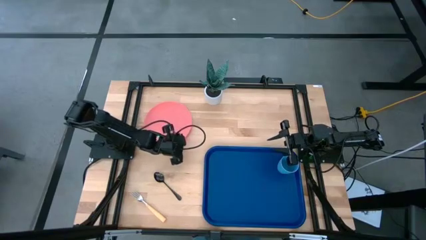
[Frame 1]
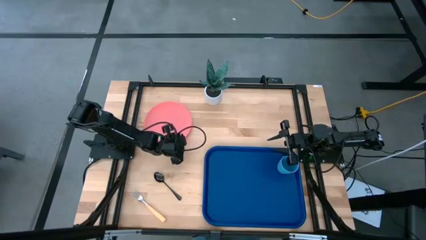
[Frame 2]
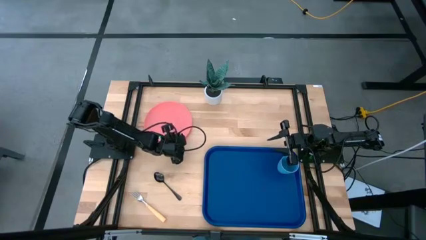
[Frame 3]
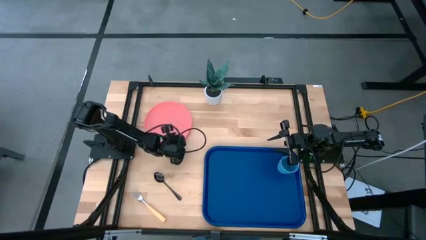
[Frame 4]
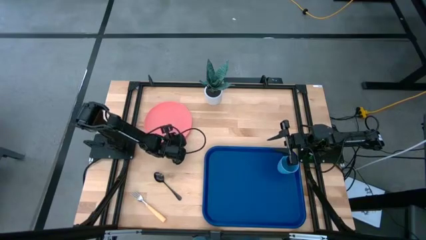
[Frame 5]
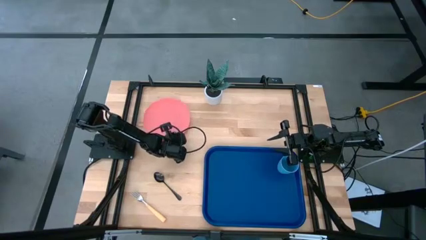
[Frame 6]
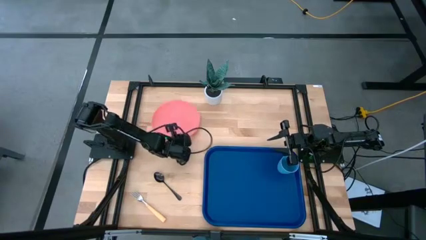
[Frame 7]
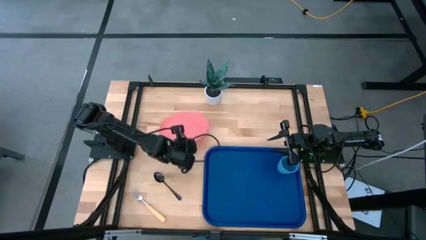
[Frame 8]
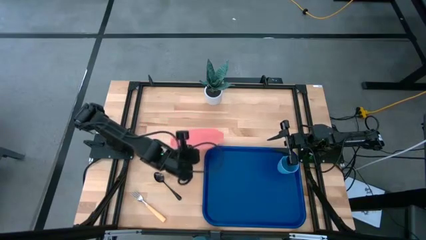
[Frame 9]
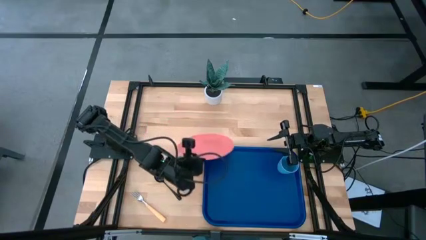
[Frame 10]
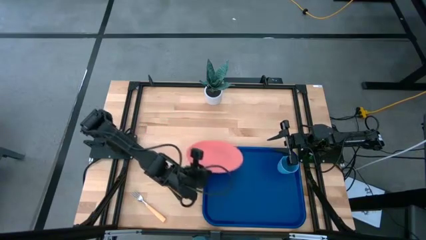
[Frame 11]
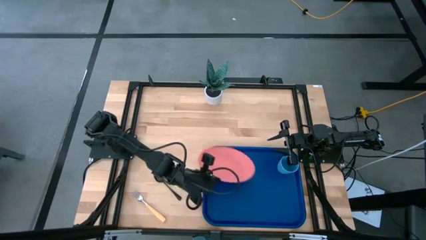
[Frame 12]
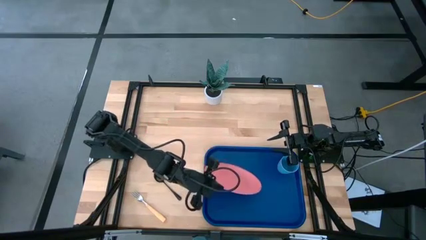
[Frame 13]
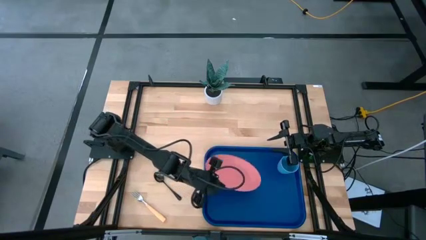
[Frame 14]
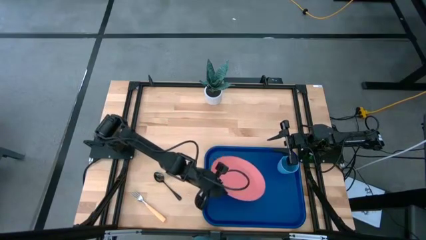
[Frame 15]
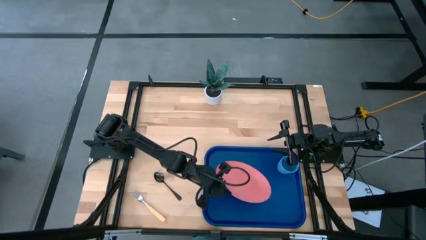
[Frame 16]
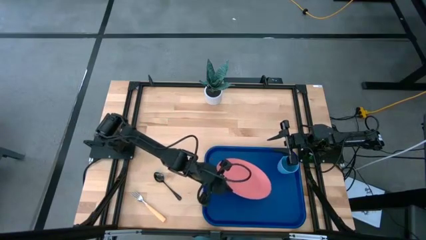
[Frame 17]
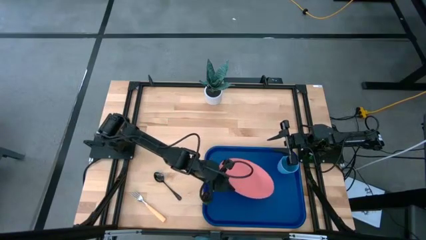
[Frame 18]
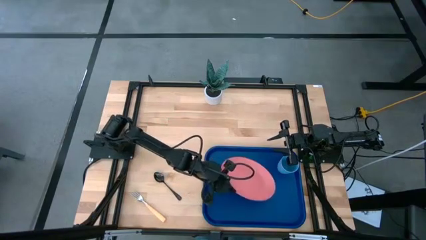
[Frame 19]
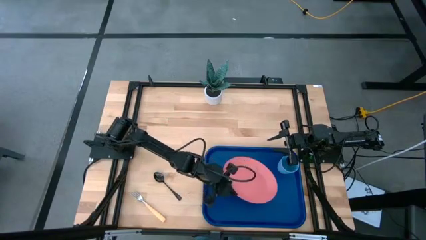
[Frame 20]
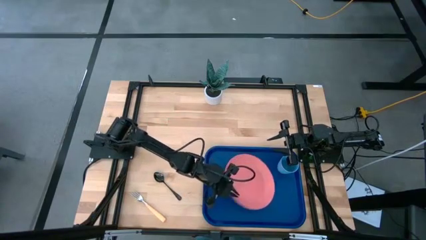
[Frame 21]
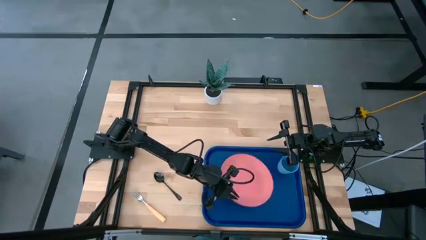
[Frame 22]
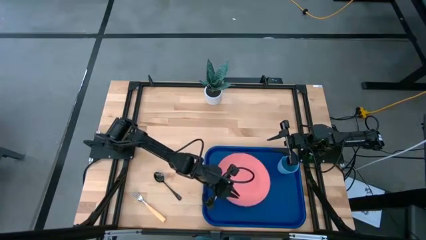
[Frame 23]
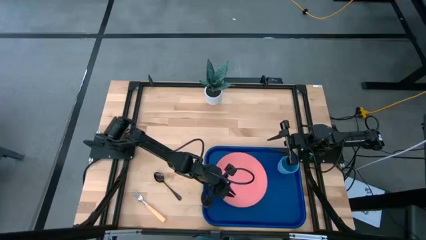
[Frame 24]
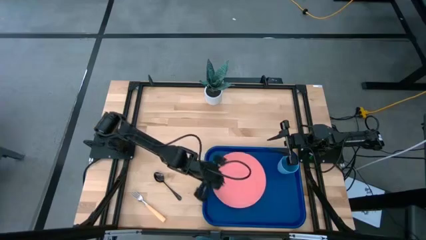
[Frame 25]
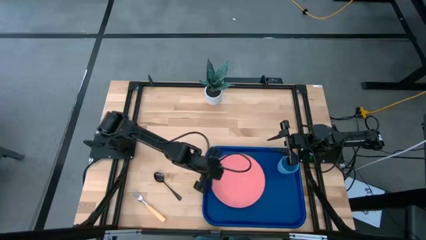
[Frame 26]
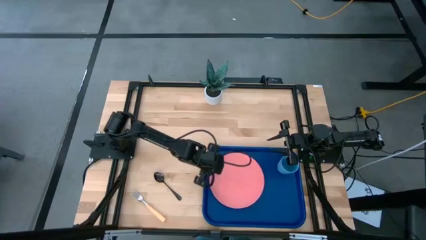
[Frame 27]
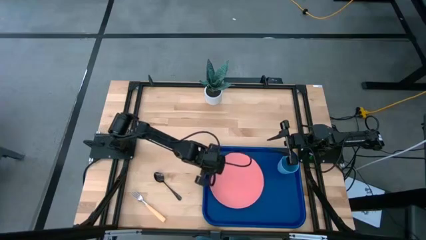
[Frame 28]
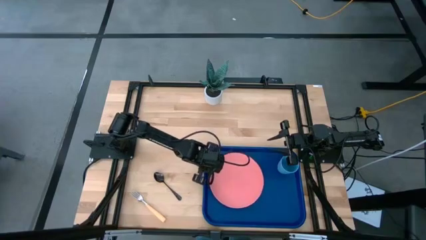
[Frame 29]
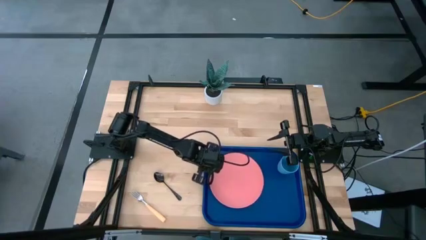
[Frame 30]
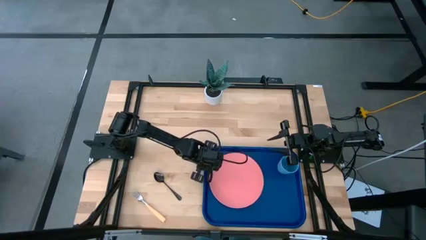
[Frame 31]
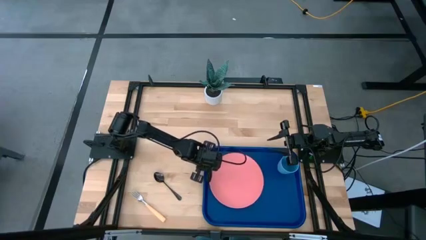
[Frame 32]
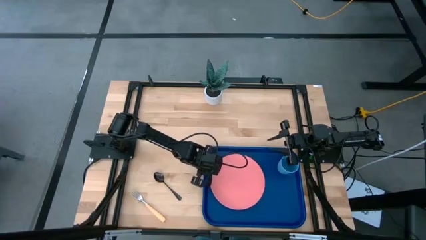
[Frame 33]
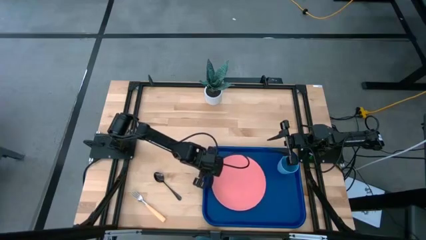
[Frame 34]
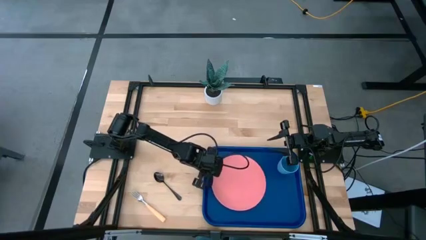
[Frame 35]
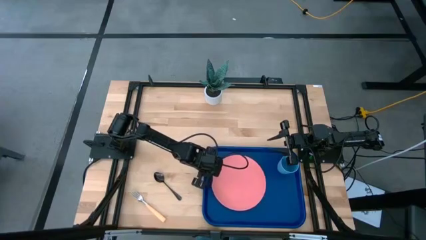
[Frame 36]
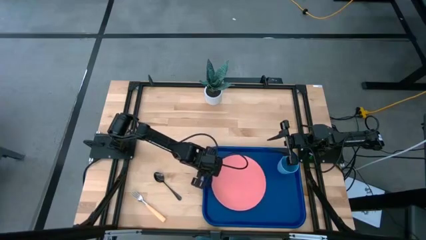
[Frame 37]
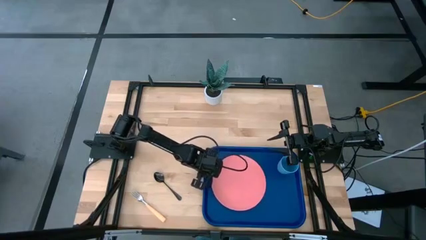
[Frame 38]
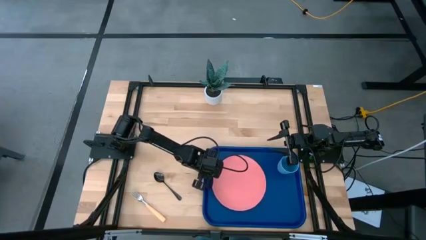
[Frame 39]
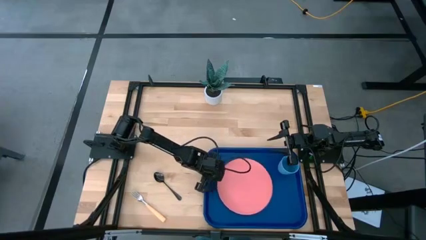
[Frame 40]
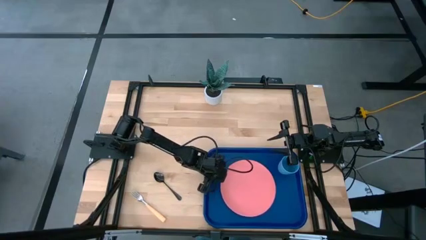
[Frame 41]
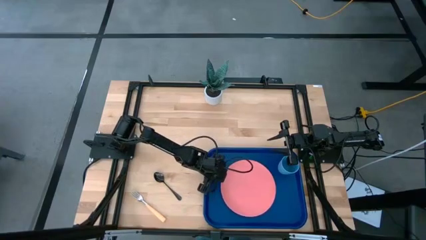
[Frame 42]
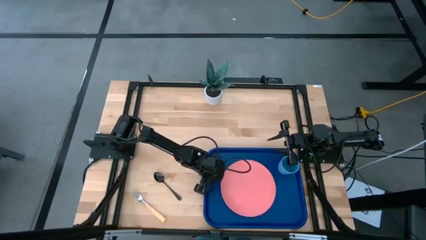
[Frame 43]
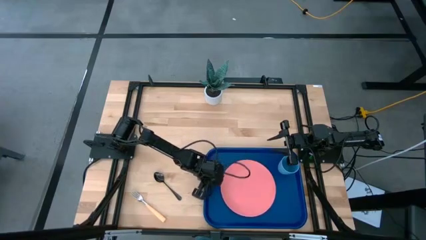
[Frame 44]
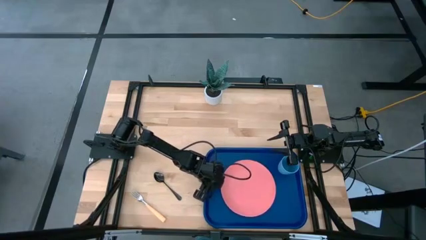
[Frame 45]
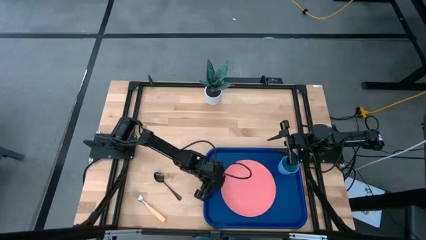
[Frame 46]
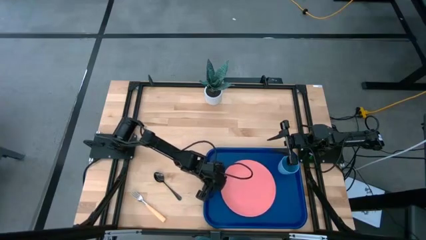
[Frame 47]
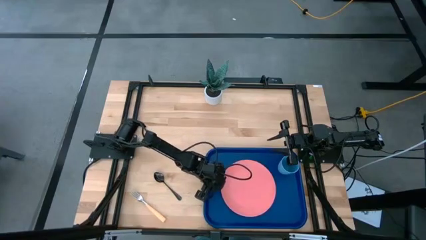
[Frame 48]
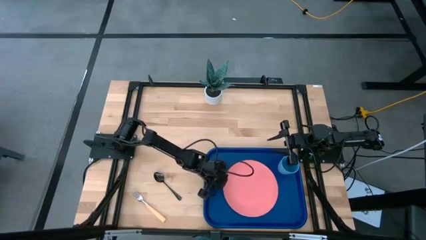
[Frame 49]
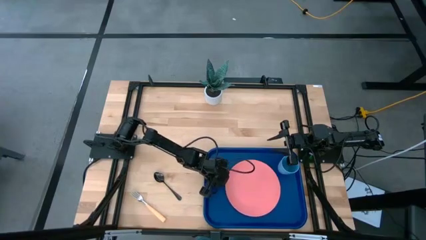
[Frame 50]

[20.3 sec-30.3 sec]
Task: Pick and place plate/cup/fork/spoon on tray
Put the pink plate in the center of the blue tray

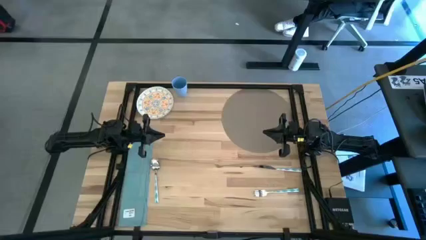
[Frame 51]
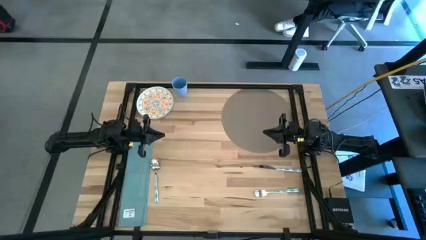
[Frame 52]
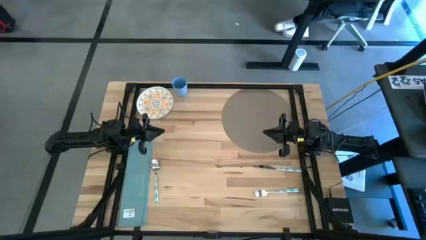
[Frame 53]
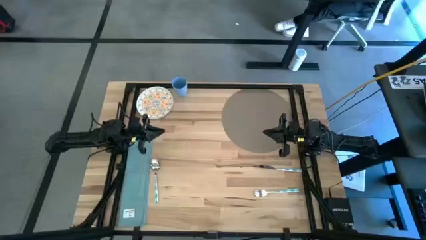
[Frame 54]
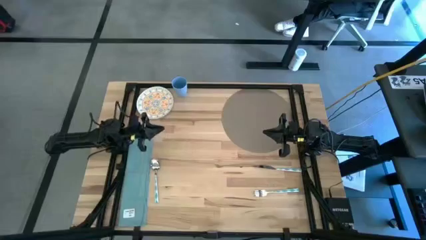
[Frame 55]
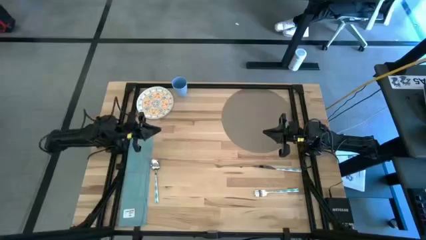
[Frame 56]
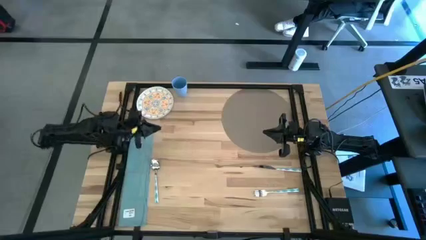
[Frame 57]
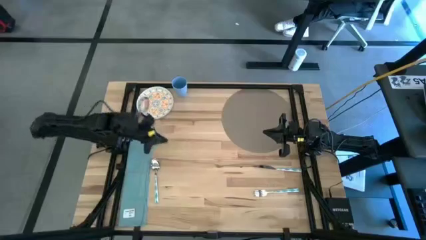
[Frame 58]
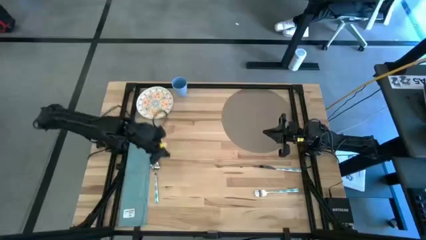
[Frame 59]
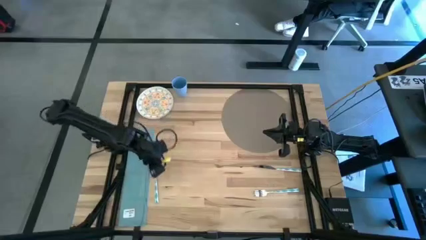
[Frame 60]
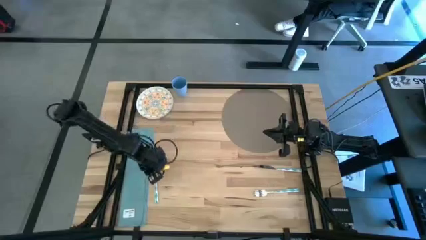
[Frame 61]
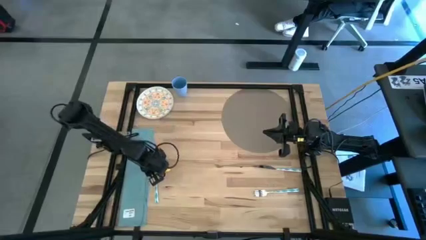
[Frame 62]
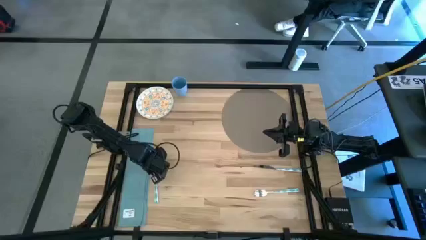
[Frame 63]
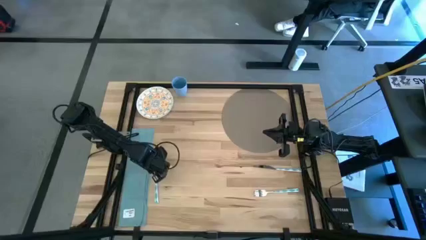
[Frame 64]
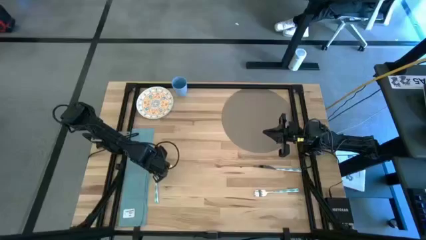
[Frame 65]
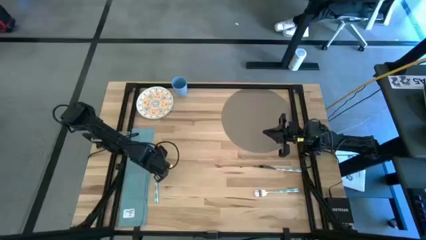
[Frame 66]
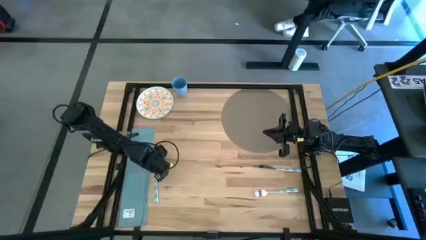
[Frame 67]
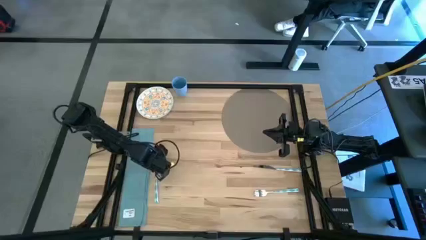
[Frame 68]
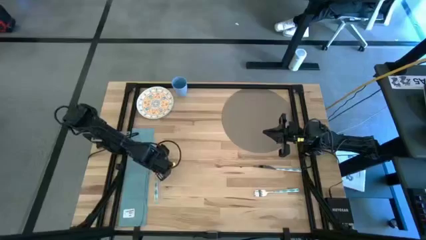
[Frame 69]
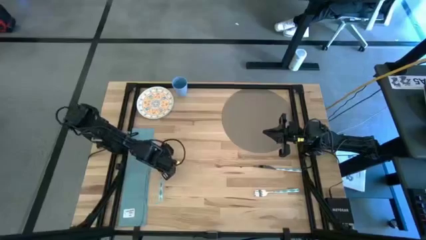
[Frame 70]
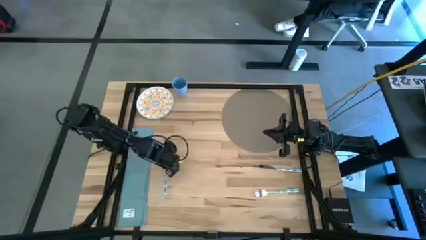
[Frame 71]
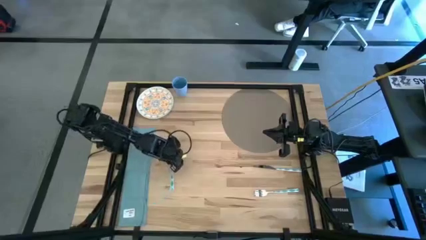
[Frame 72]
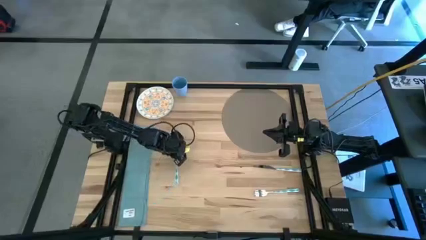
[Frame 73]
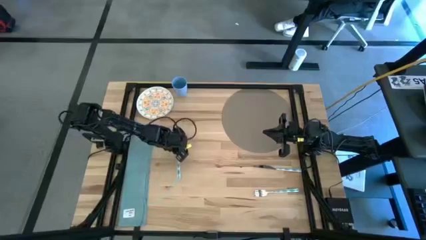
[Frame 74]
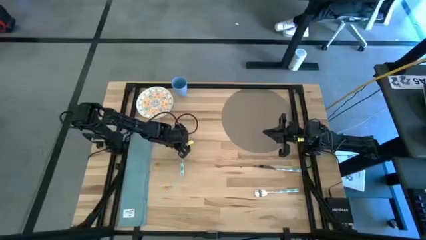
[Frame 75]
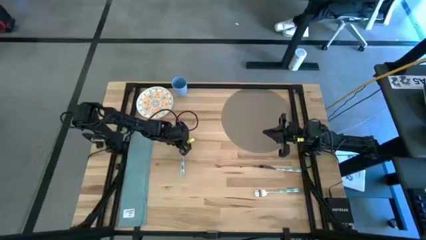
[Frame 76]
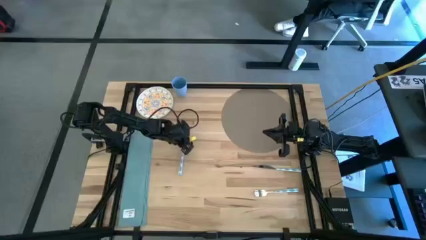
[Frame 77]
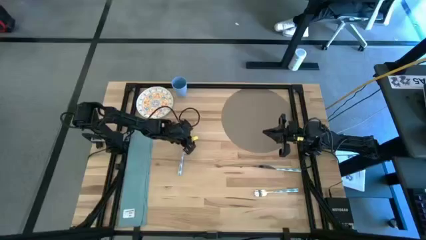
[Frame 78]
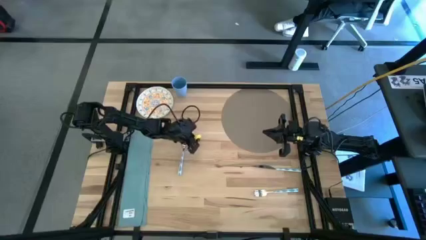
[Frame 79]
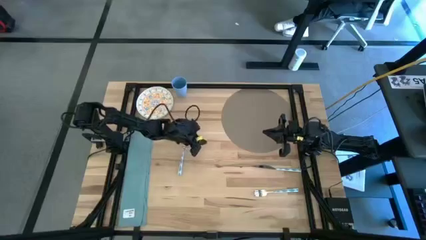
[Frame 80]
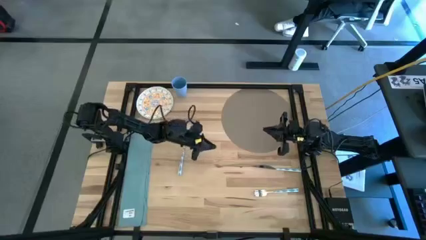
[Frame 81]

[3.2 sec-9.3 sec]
Task: Set table place
Put the blue spoon on the brown mat
